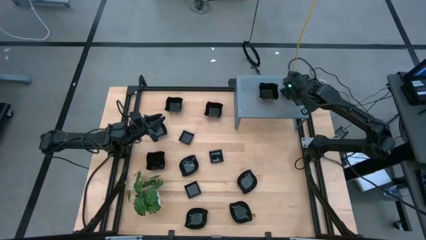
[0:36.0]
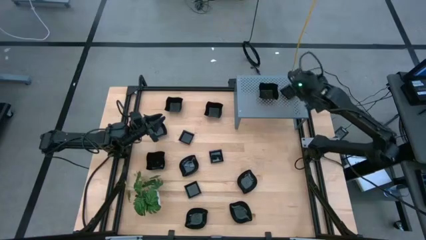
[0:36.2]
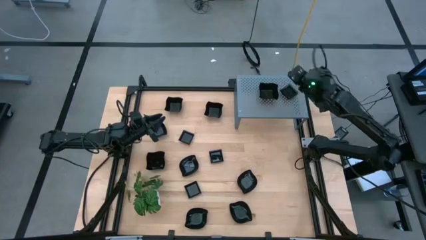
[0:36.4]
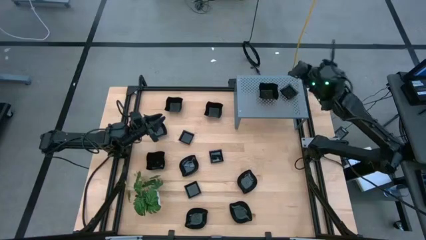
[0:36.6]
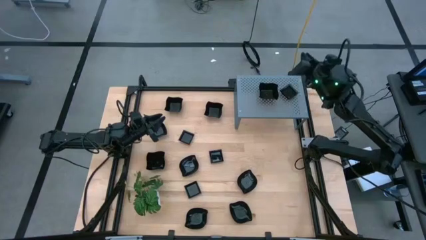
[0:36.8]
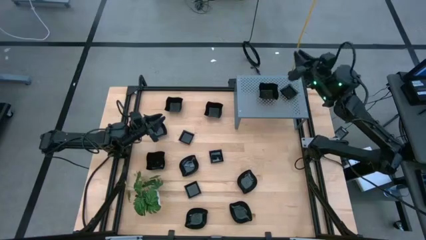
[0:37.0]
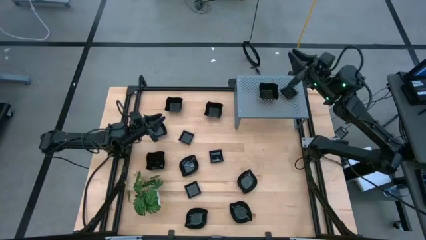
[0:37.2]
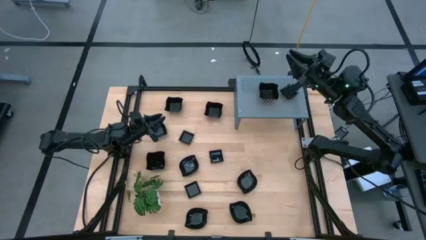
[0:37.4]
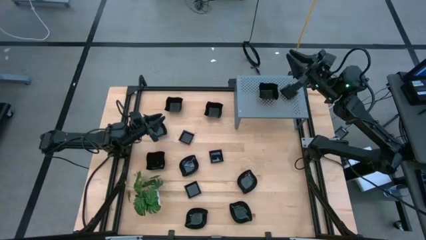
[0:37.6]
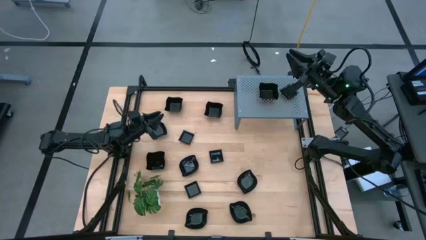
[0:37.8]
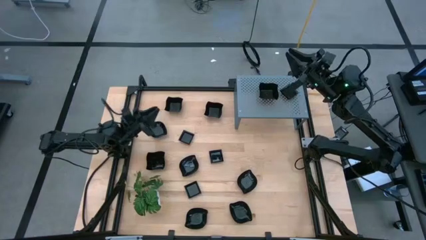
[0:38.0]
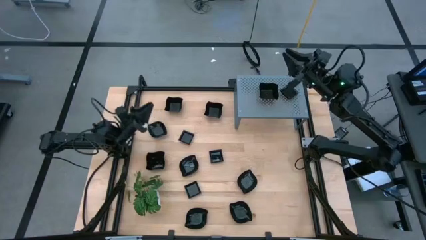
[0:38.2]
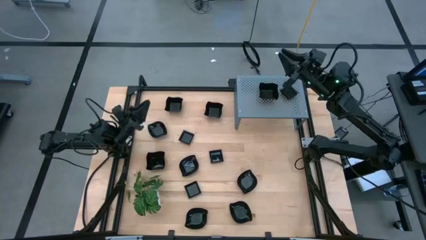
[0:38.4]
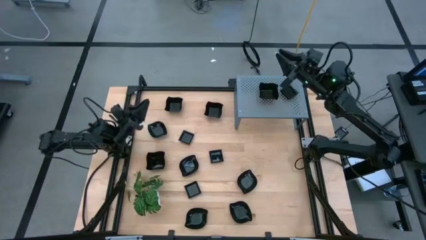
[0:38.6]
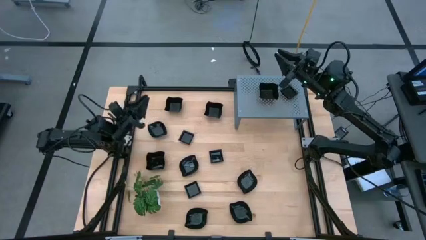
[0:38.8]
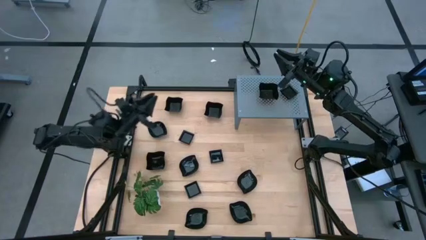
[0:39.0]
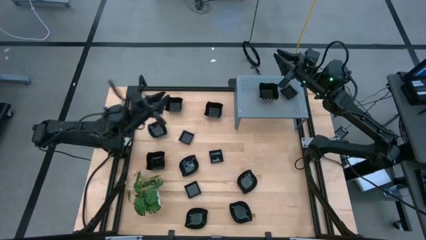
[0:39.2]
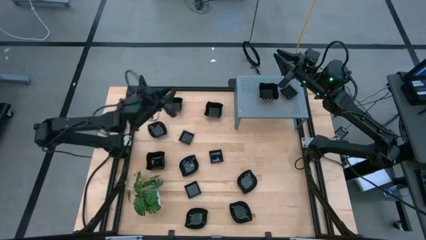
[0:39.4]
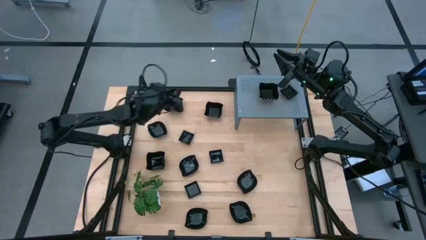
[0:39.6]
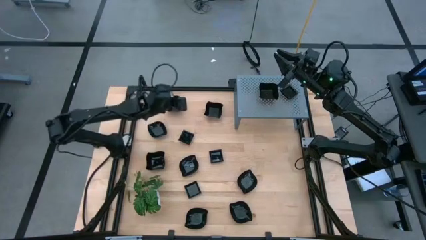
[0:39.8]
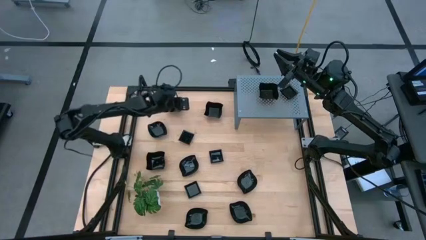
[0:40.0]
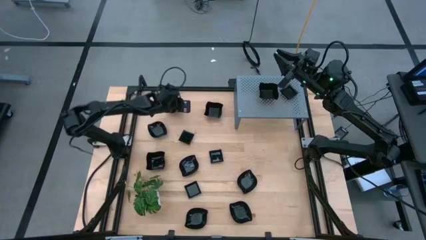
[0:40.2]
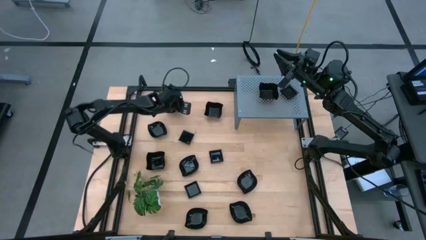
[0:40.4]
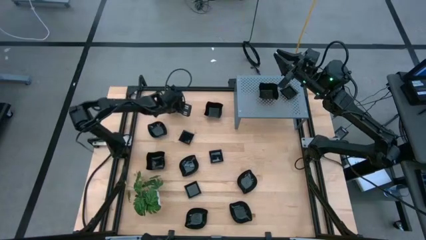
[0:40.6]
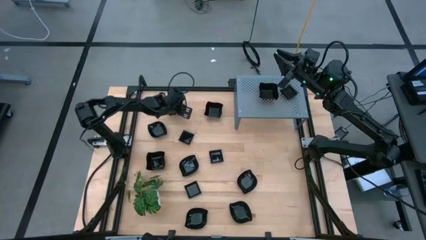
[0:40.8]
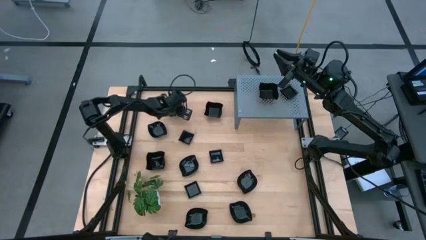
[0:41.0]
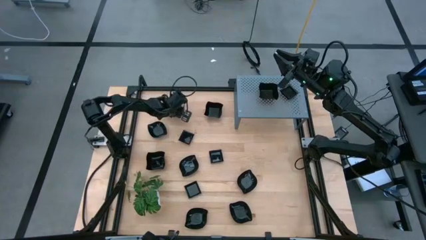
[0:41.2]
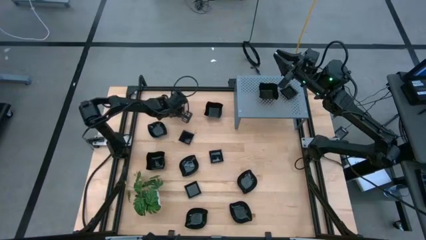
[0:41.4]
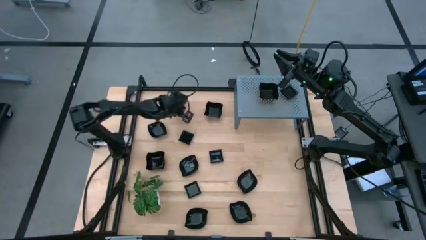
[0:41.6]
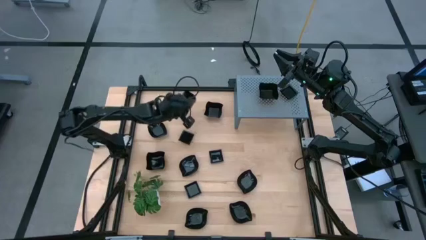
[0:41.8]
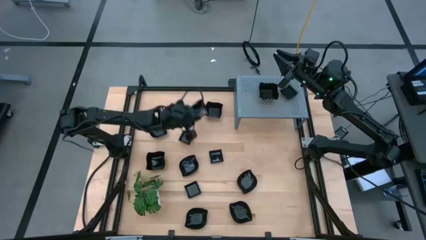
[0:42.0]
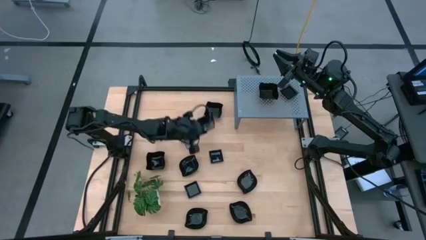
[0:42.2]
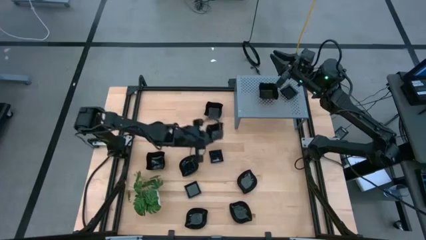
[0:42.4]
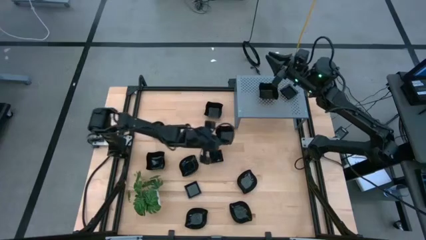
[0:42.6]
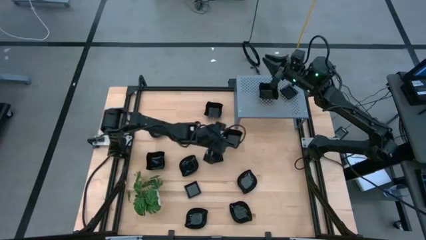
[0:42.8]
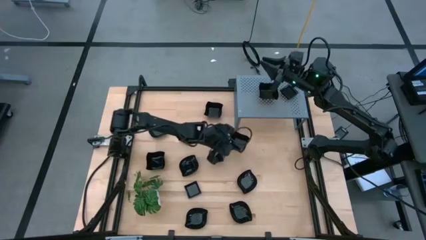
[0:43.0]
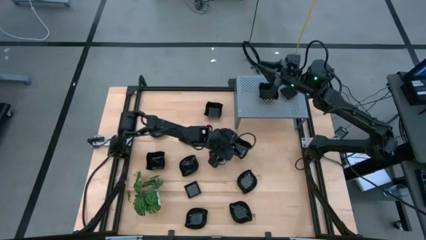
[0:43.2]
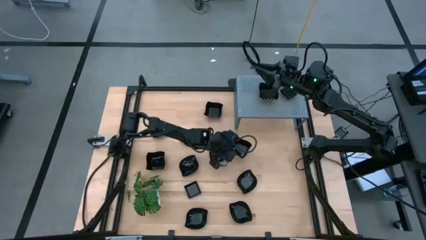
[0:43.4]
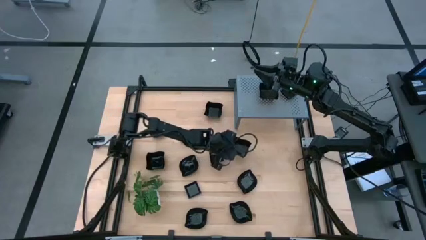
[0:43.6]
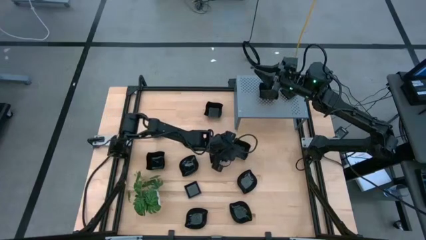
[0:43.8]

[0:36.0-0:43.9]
Task: Pick & Place Mini shaped plates
Move the black distorted square plate to the middle of the table

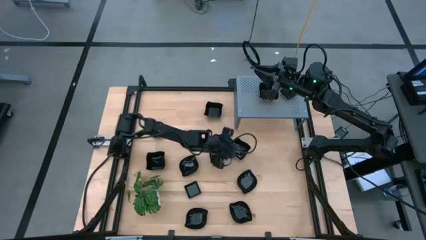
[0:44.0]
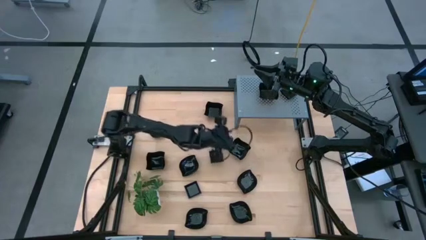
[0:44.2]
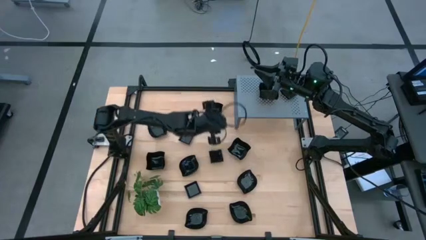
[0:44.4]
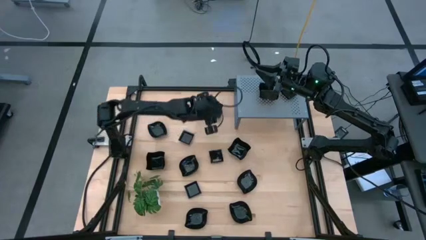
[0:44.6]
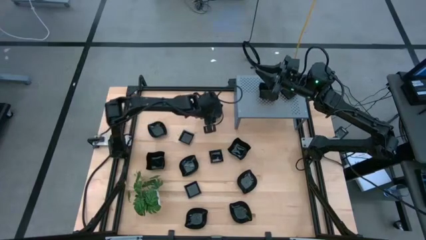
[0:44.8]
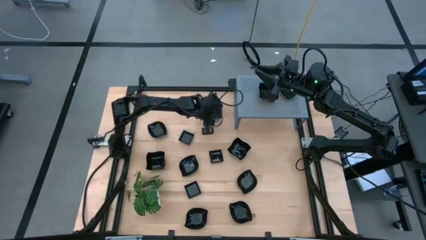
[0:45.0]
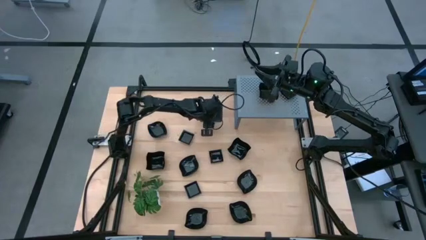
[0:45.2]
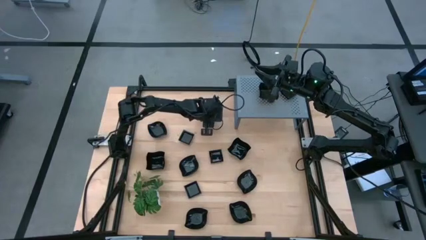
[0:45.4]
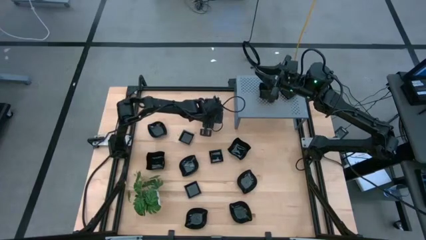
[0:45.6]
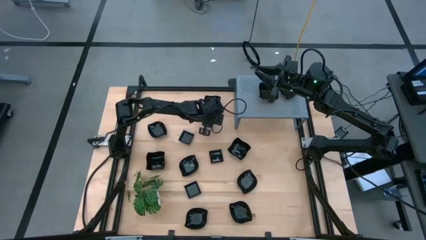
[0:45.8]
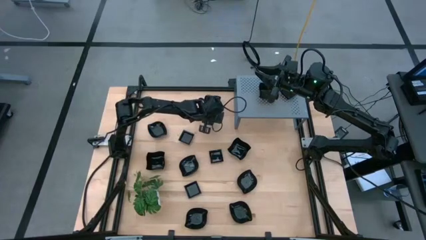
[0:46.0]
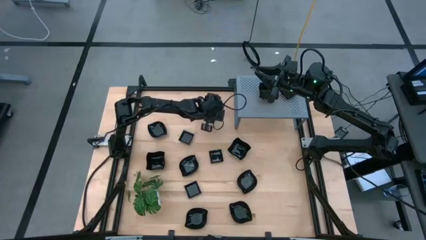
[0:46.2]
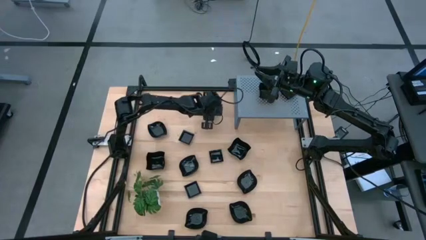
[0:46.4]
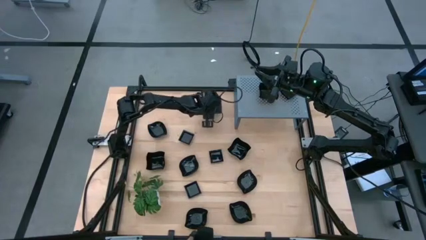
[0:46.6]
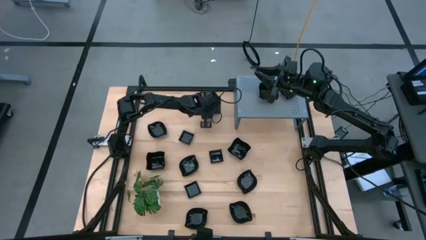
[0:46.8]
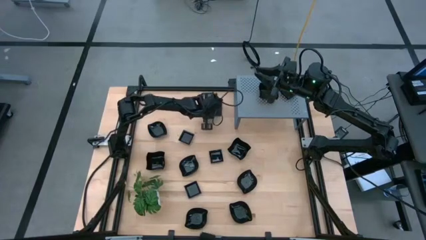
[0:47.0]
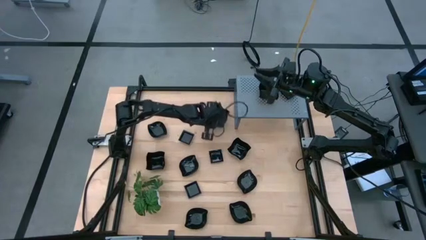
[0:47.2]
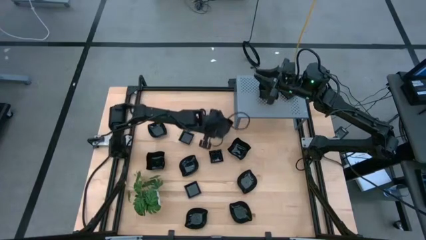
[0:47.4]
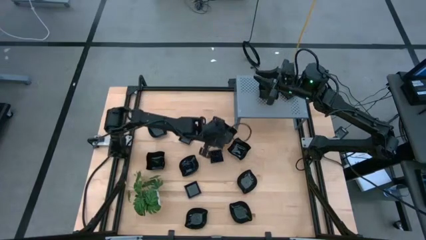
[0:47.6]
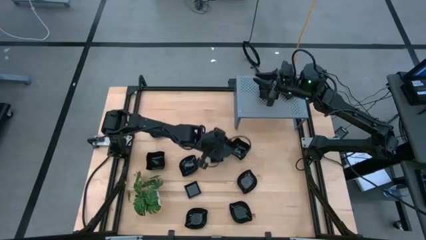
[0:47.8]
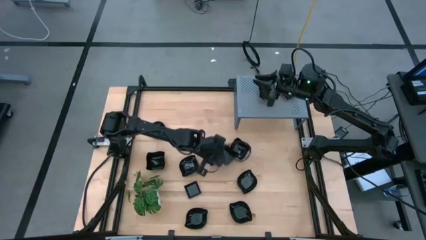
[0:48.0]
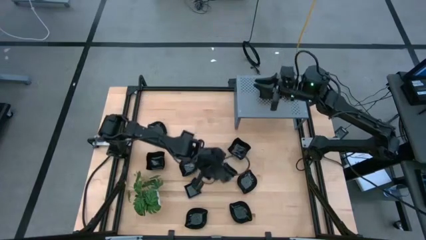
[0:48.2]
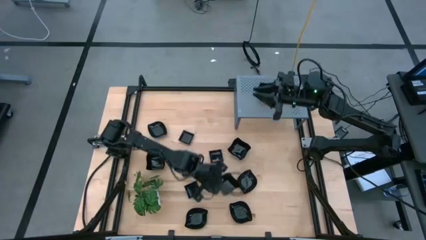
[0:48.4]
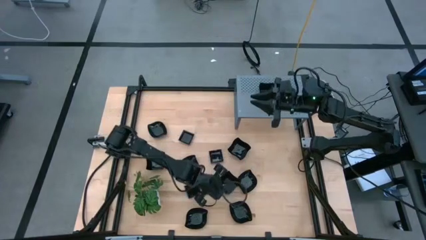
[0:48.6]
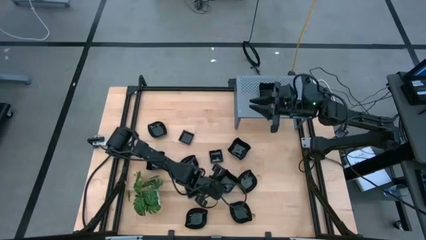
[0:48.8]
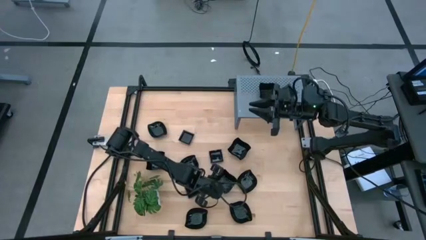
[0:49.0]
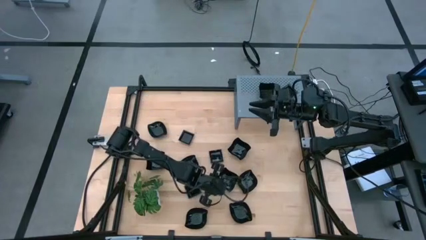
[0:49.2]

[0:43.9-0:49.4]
Move the black distorted square plate to the middle of the table

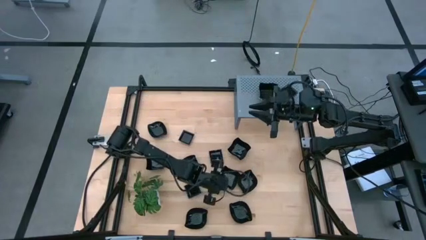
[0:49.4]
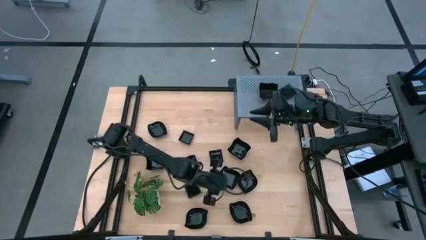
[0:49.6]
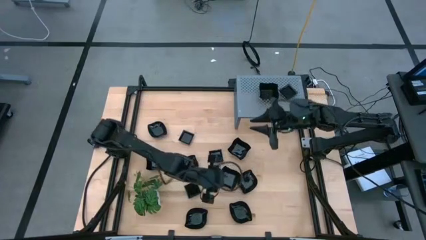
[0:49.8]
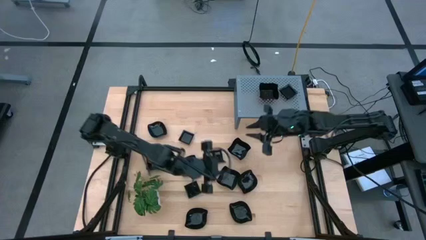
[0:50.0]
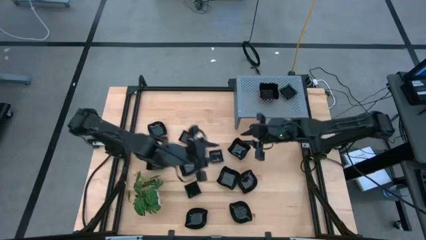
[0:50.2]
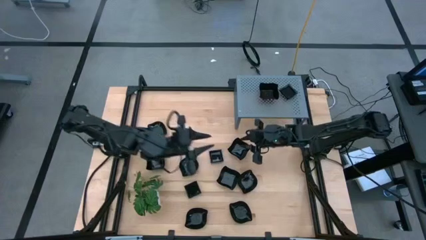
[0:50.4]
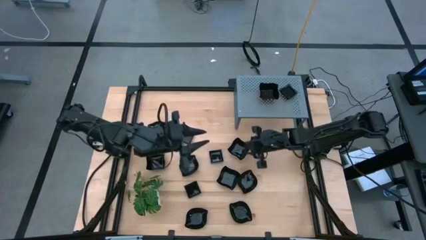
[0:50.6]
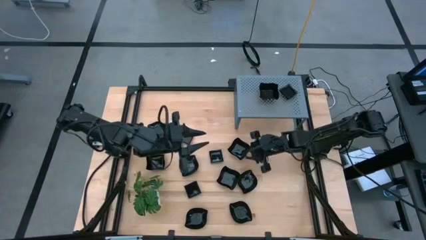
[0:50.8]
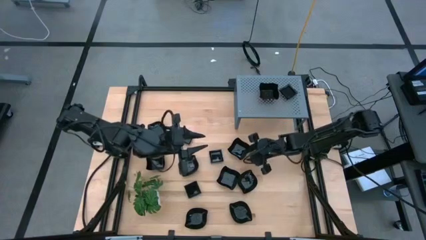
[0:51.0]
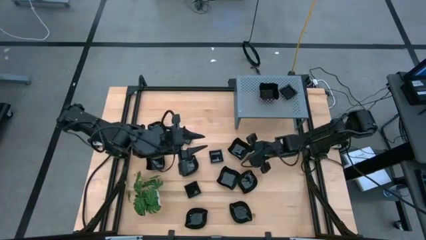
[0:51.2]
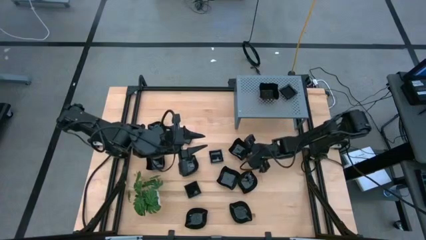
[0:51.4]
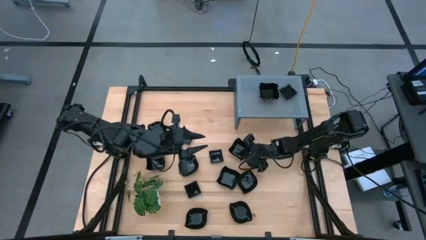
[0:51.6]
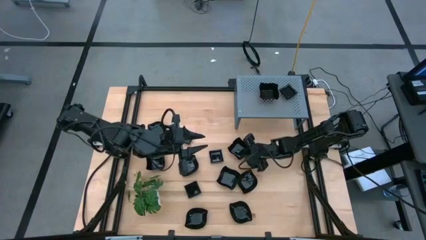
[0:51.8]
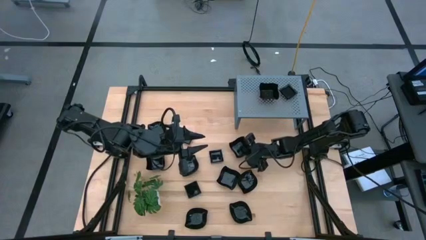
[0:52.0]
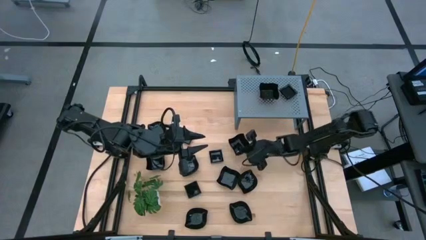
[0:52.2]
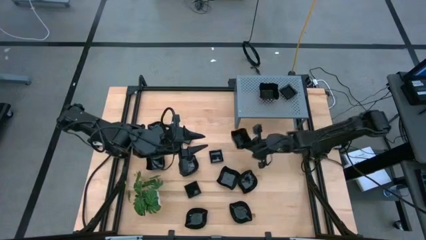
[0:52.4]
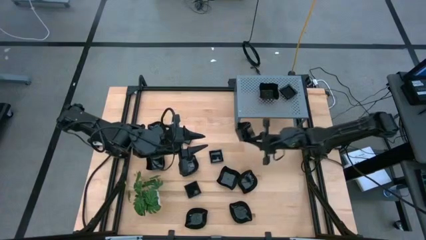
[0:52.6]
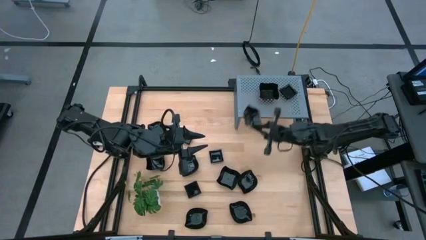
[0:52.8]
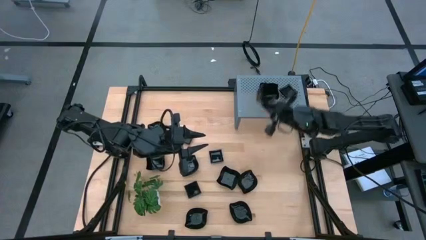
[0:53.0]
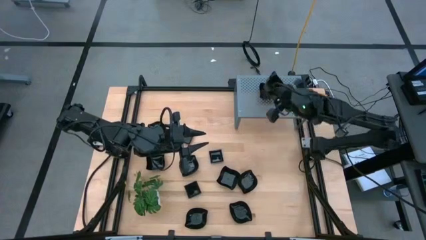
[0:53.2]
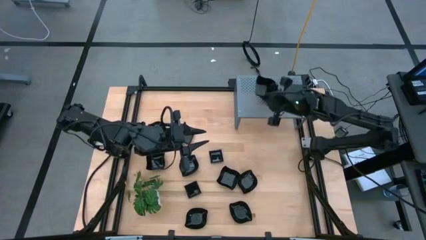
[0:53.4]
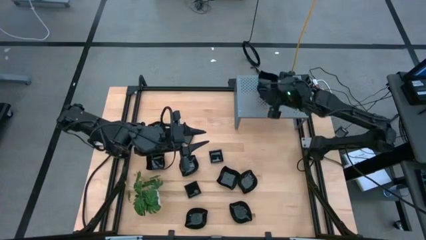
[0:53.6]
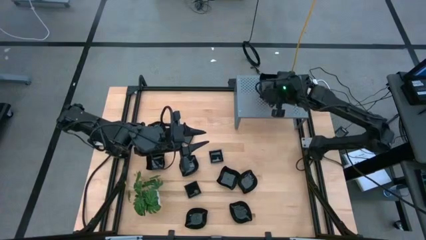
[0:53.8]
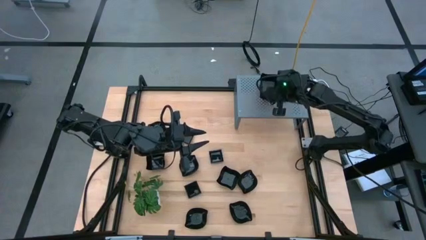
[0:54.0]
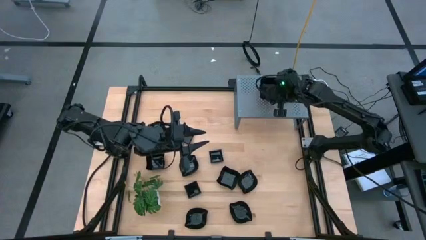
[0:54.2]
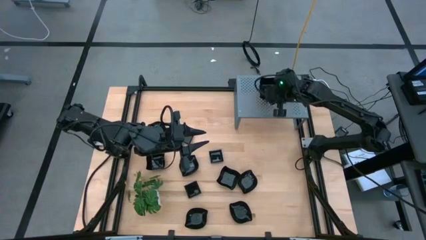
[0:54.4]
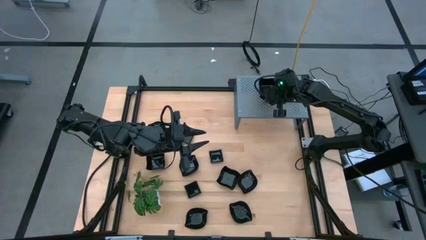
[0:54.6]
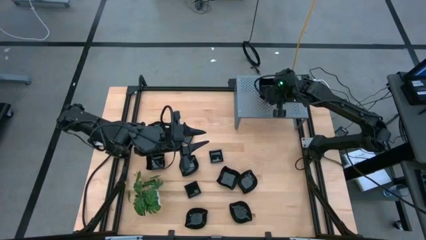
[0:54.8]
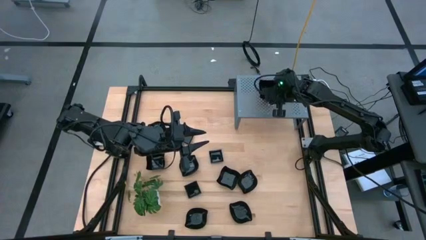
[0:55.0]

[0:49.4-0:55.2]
Stack the black distorted square plate on the black distorted square plate on the shelf
